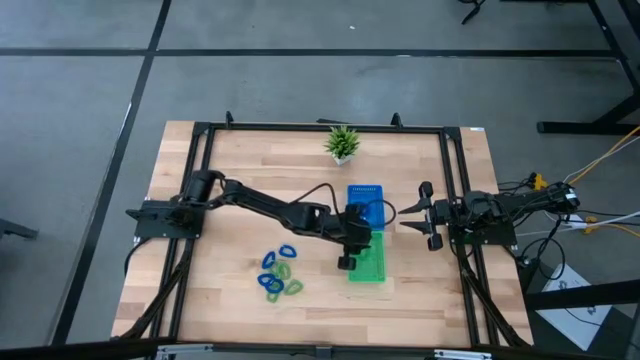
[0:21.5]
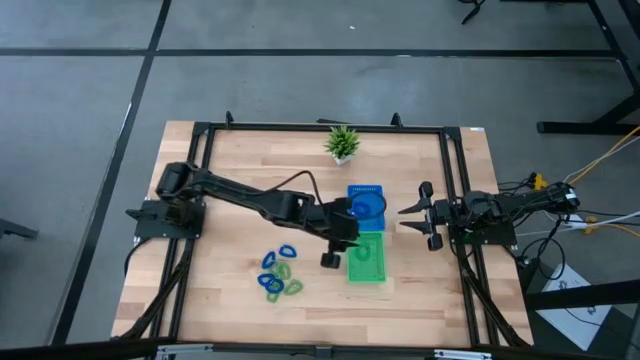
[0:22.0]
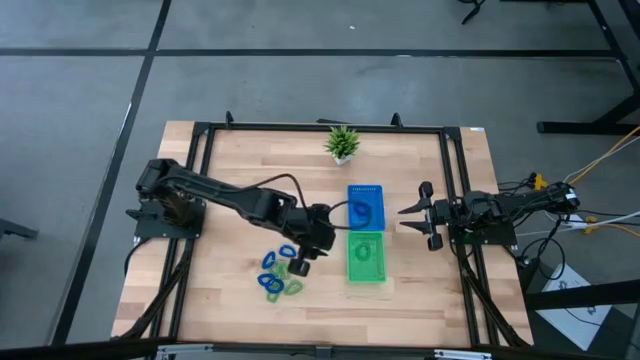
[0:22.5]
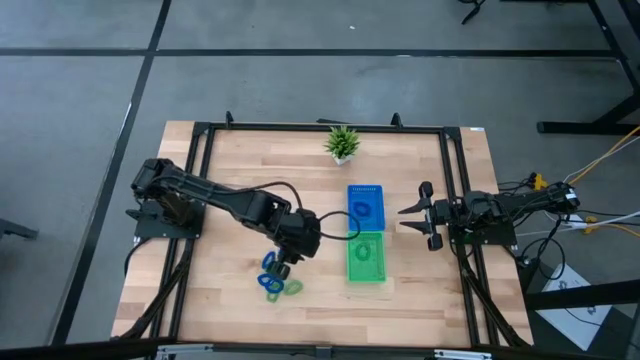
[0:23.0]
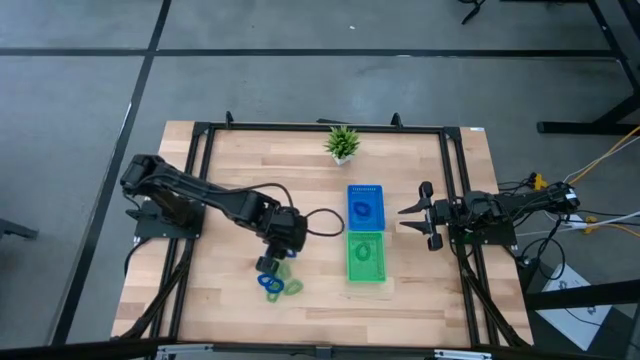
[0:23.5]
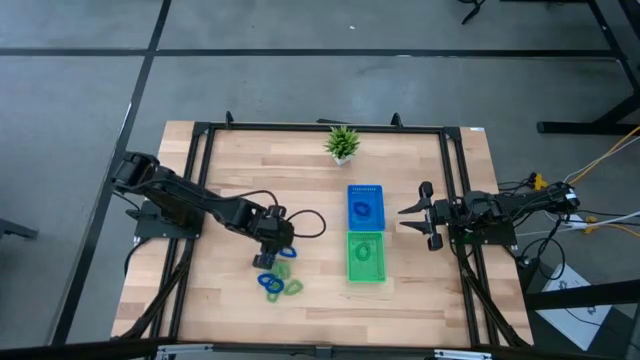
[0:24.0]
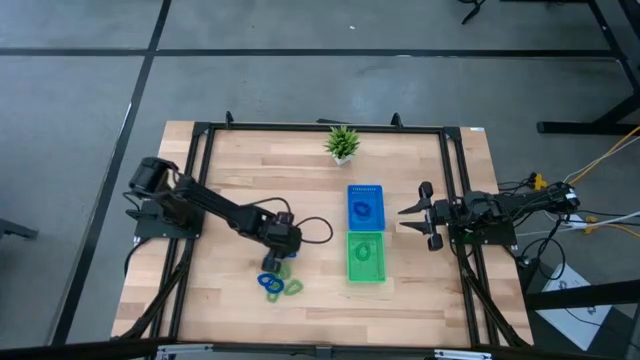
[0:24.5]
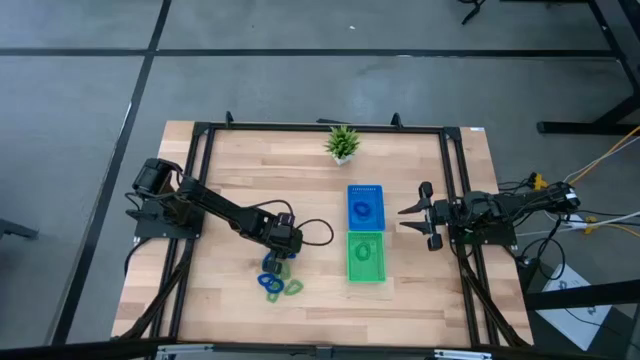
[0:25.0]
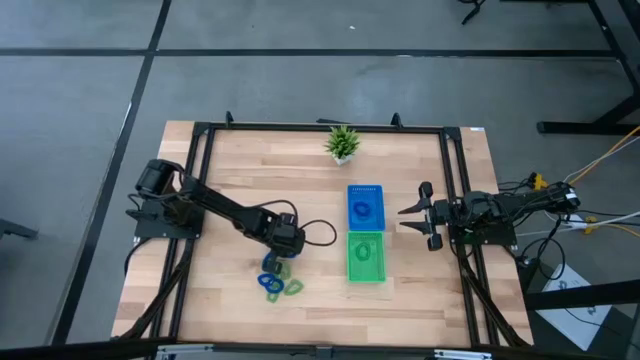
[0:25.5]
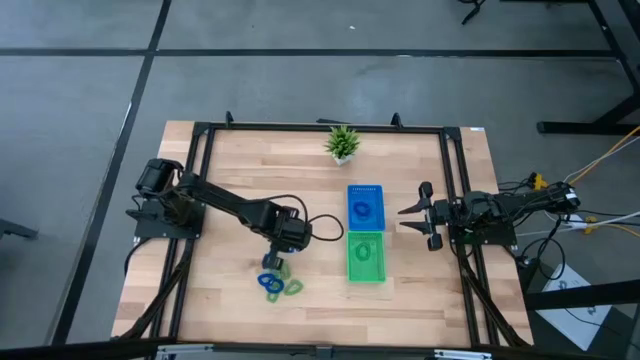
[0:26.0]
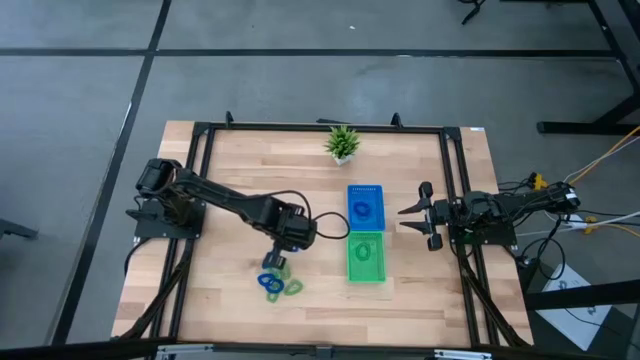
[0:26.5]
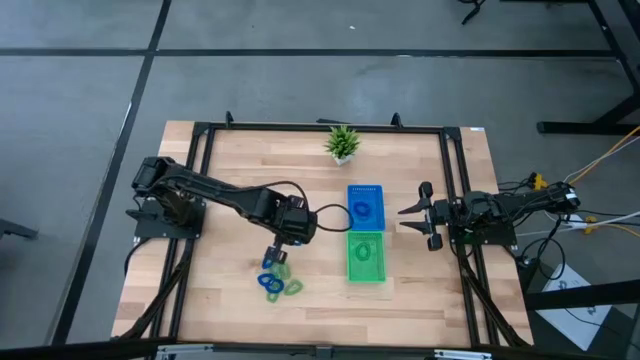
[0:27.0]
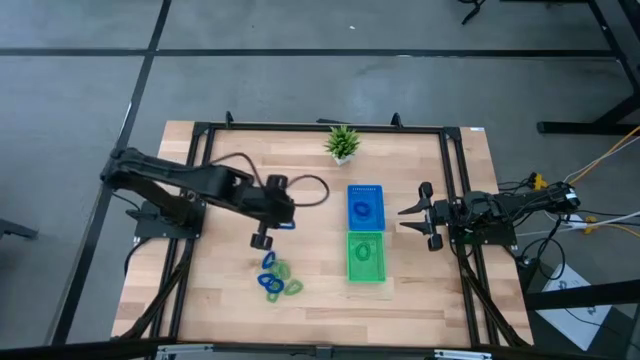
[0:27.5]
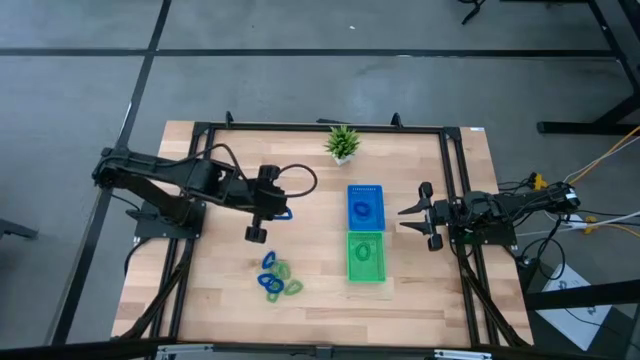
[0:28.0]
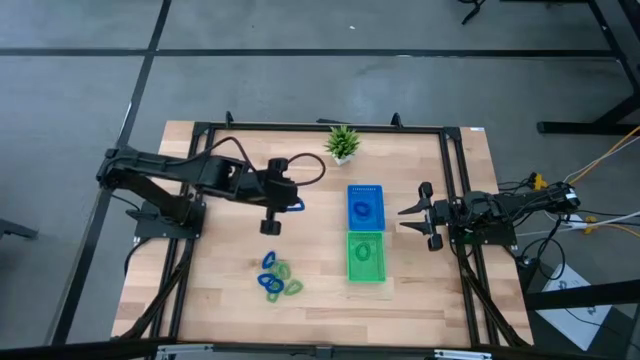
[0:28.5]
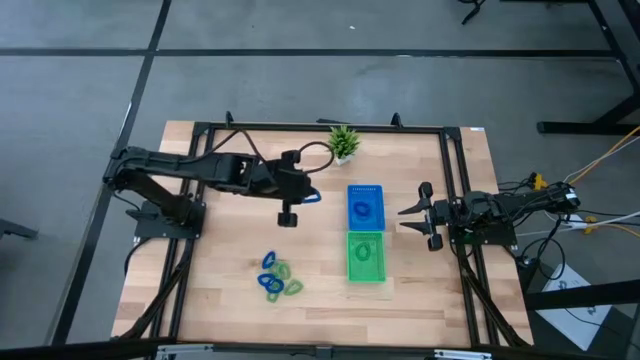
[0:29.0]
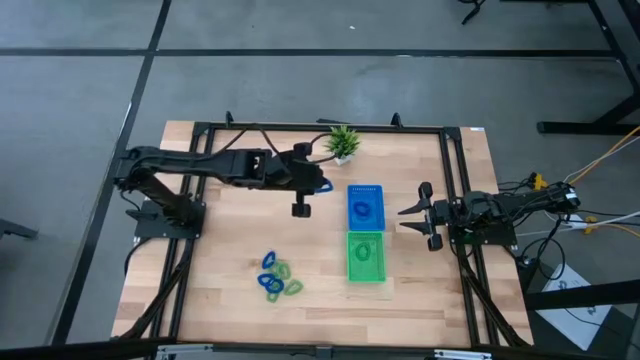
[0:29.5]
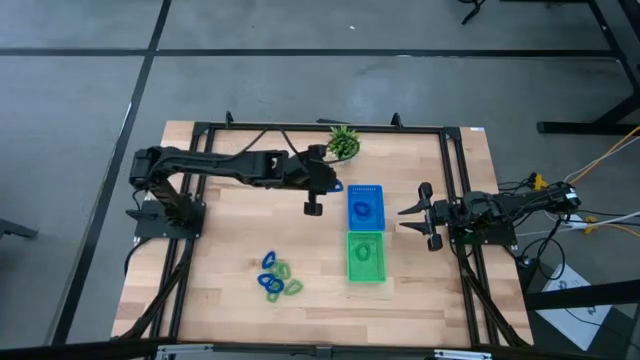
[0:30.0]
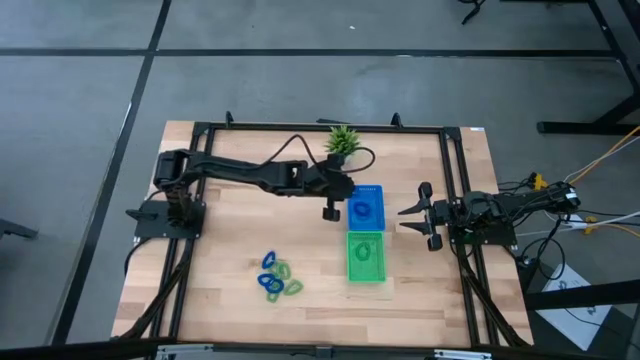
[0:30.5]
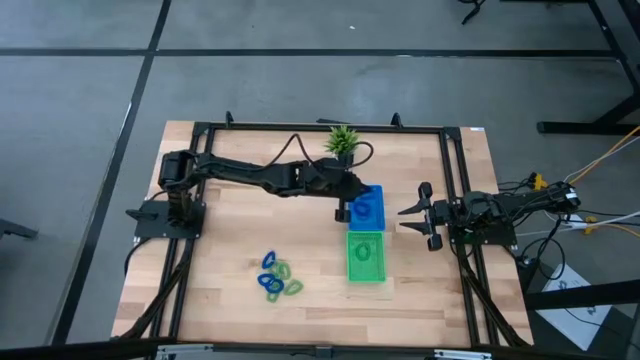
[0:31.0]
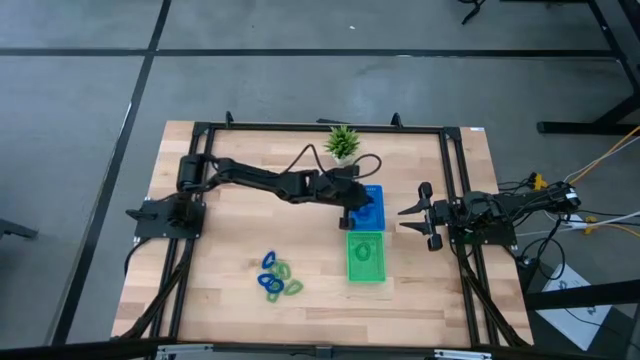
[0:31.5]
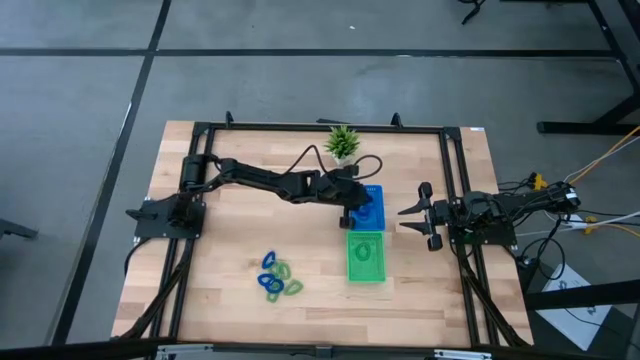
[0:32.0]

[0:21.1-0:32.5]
Task: Sort spring keychains
Put the blue spring keychain into the blue bin

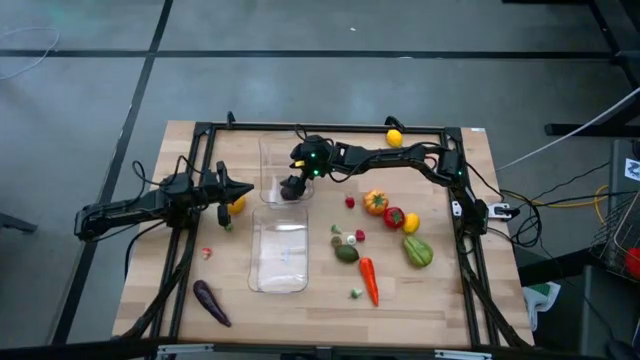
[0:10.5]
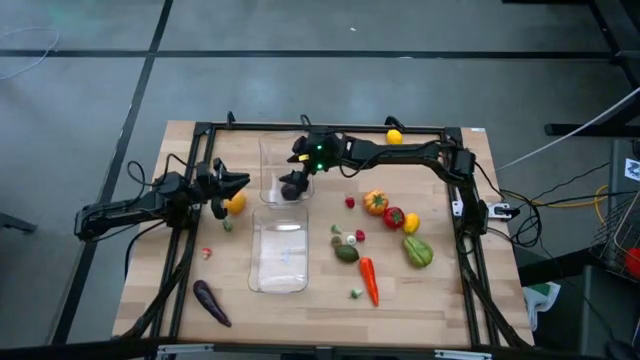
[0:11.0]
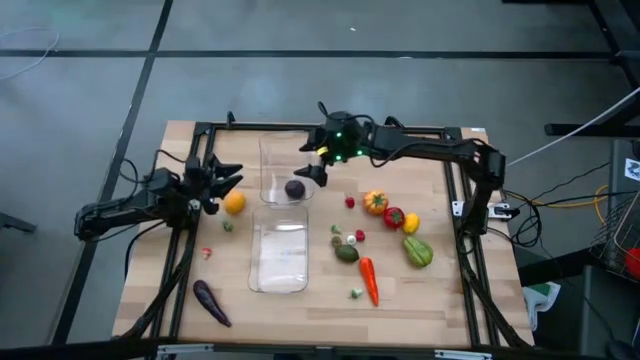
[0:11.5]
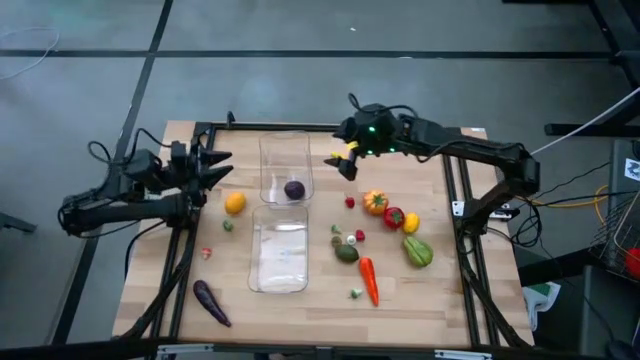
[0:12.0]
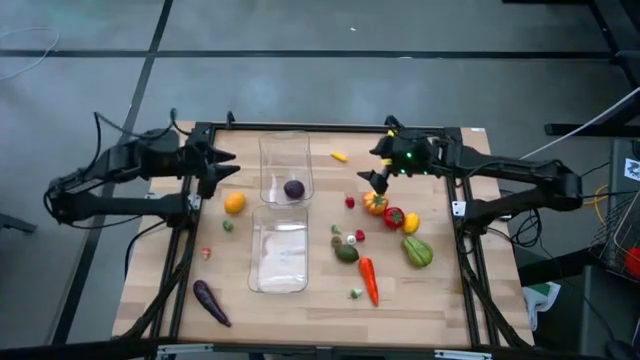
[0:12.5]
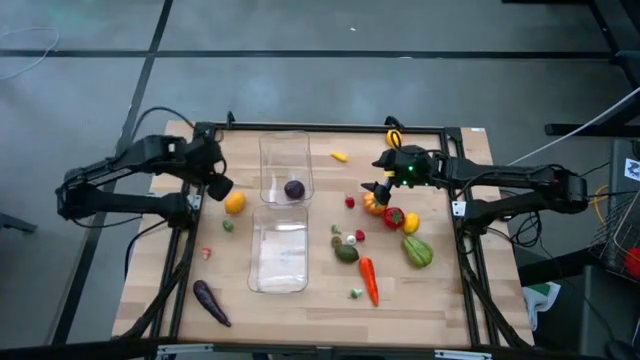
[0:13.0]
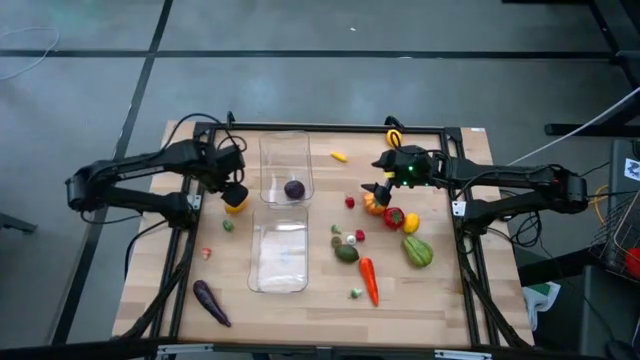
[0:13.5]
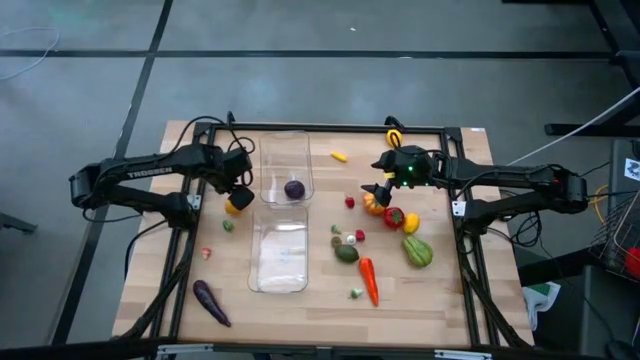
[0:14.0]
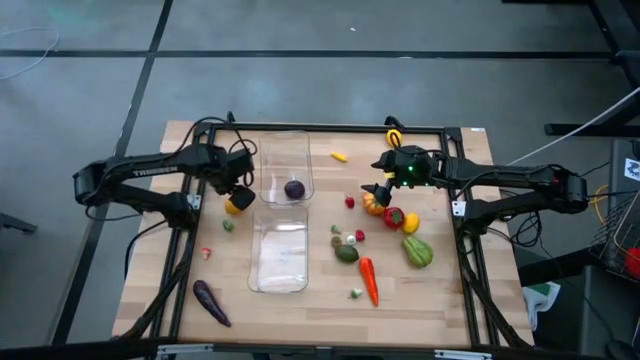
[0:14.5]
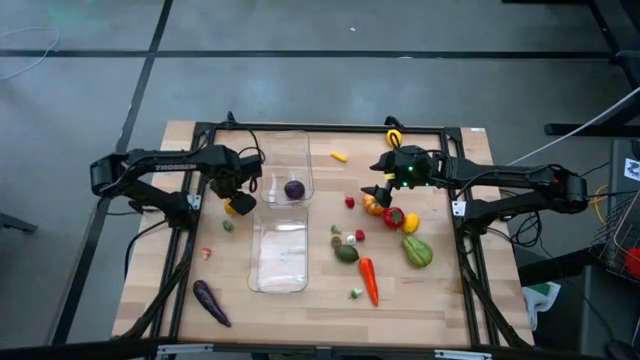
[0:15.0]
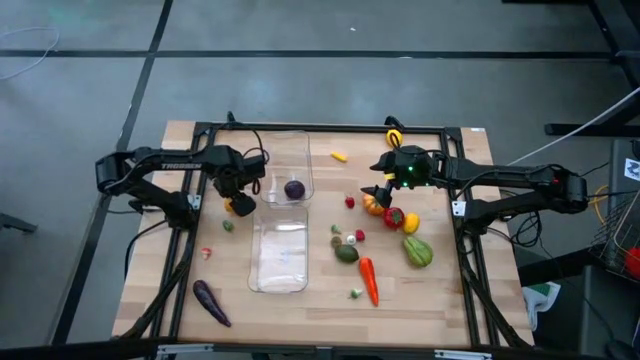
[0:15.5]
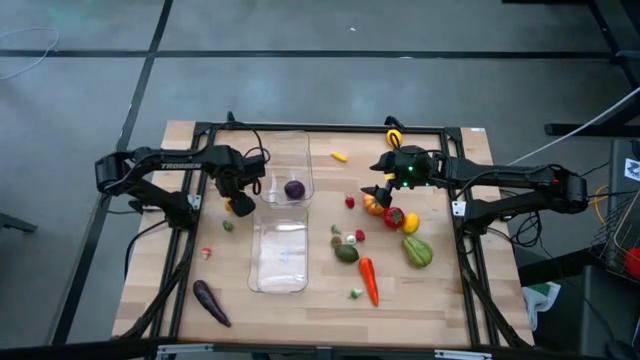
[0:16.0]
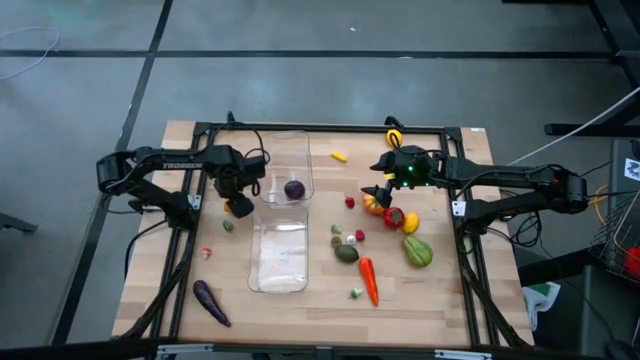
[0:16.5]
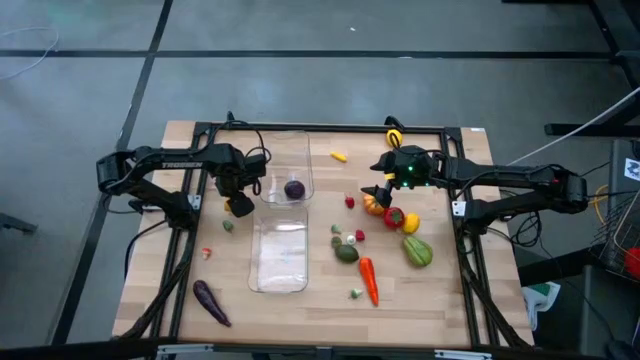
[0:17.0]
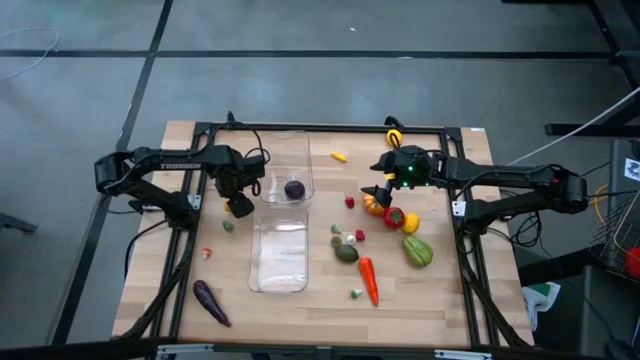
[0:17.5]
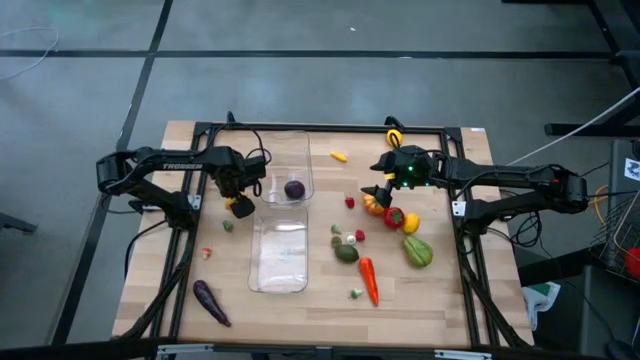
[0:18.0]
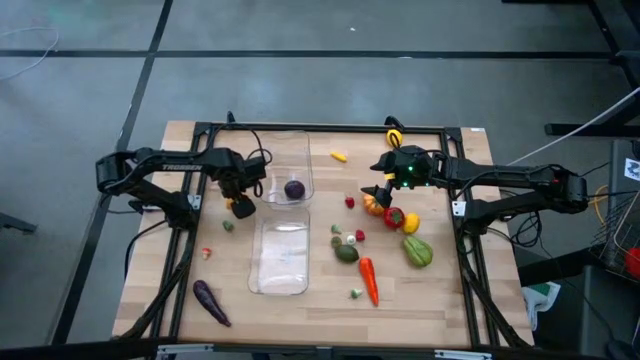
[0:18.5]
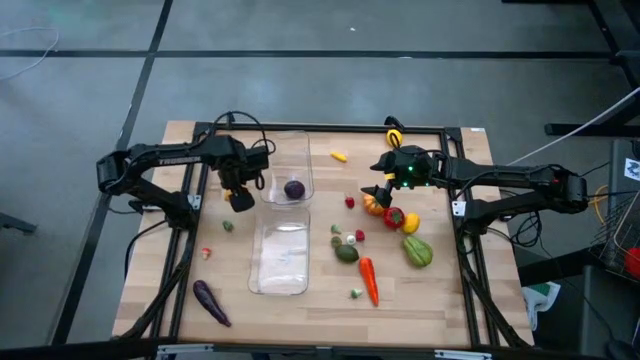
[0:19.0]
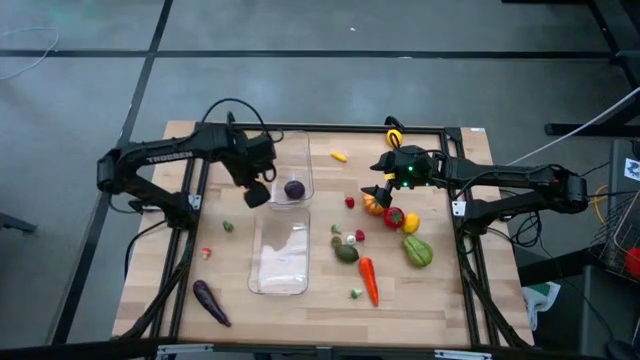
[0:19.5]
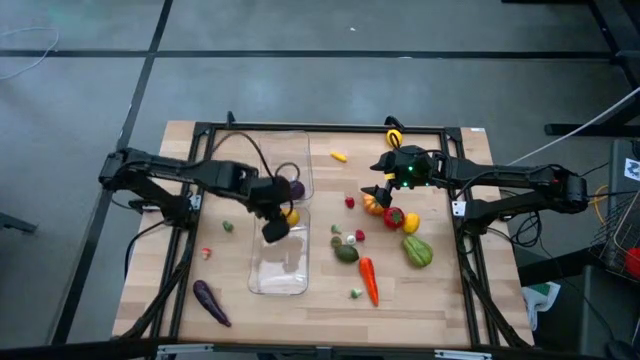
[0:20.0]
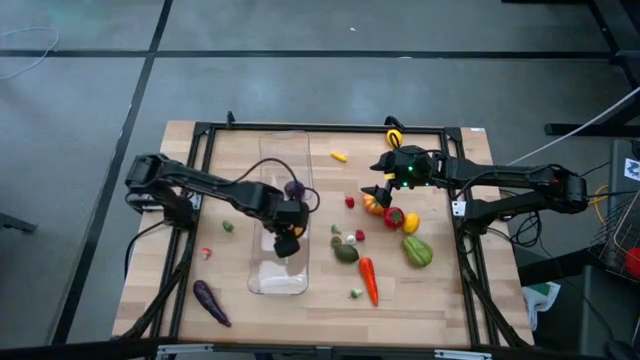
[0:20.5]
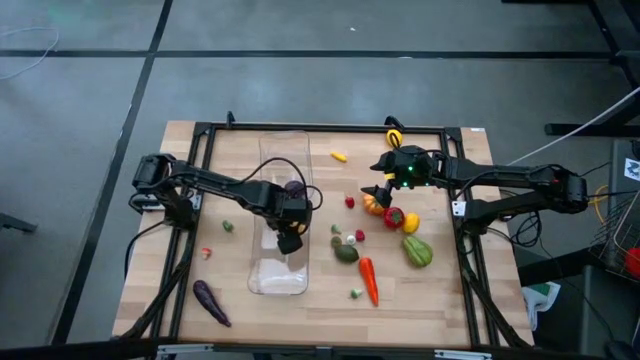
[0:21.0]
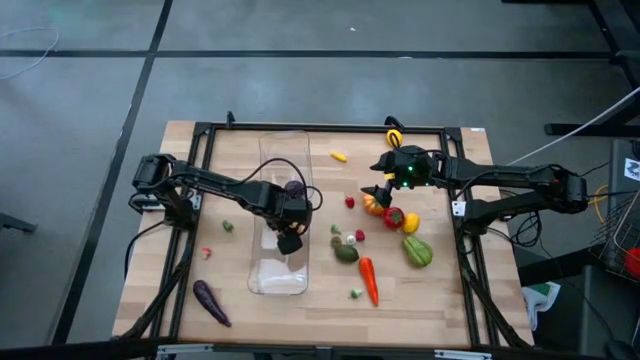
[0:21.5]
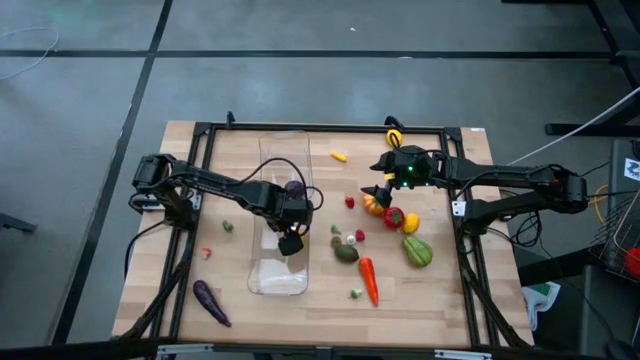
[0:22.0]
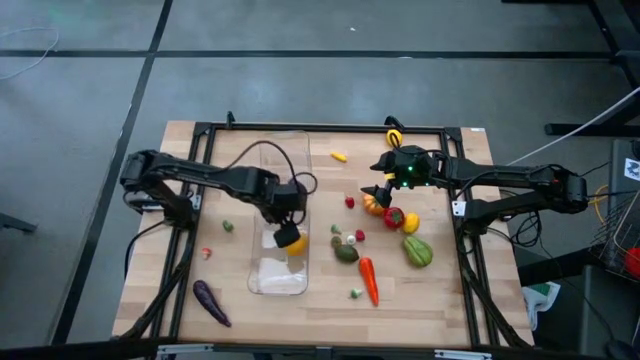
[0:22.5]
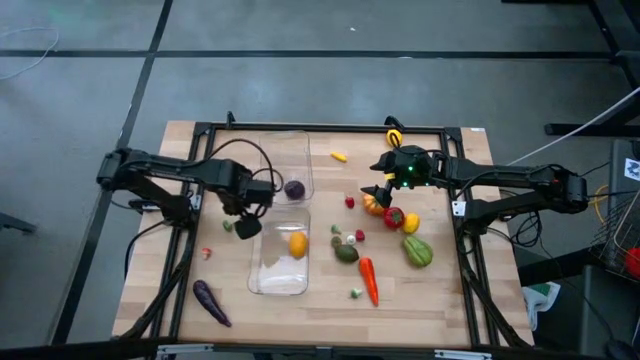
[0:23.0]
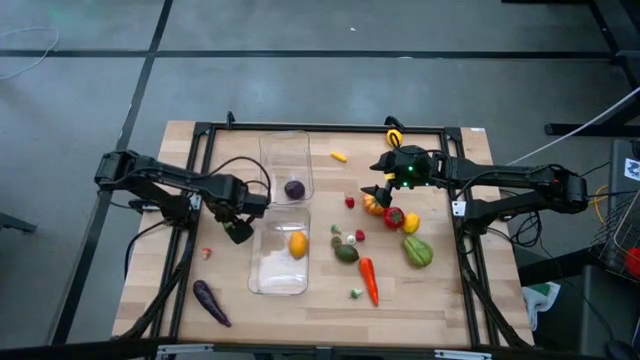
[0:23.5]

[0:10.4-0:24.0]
Task: Sort produce into baskets
Put the middle left yellow lemon into the bottom transparent bin
